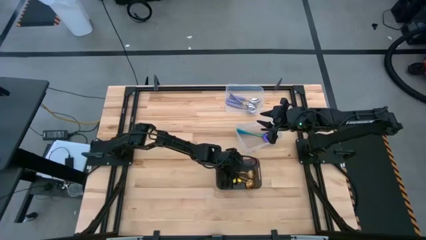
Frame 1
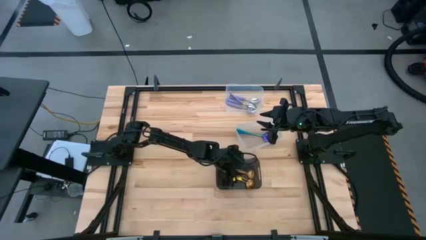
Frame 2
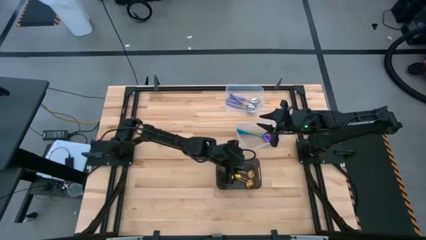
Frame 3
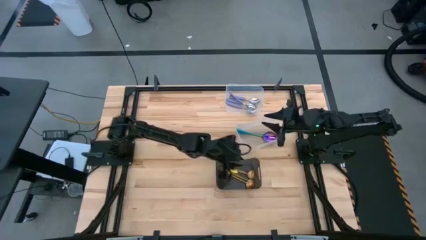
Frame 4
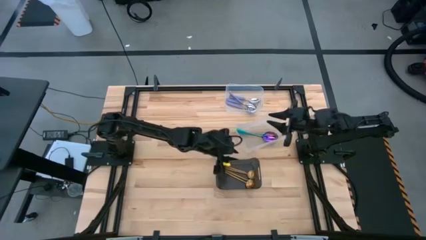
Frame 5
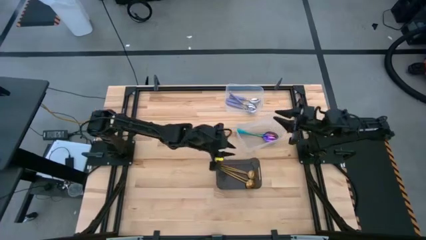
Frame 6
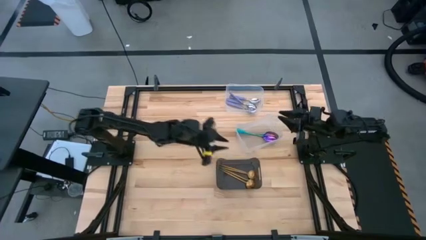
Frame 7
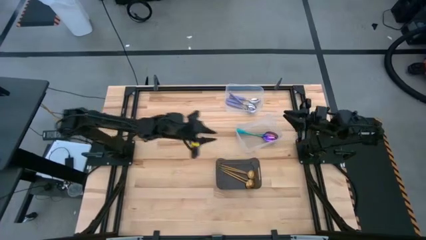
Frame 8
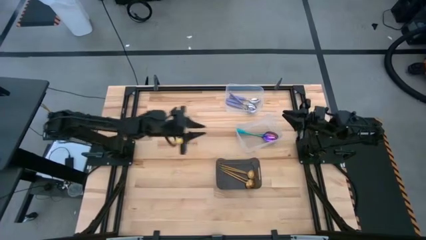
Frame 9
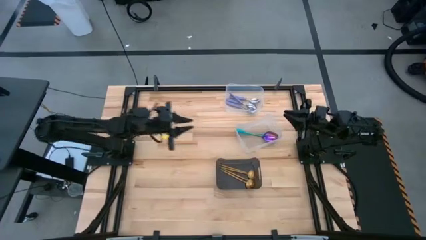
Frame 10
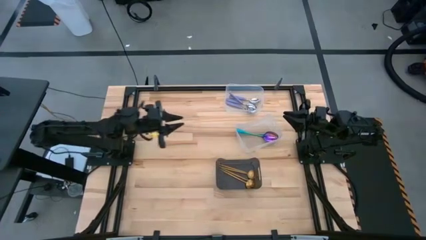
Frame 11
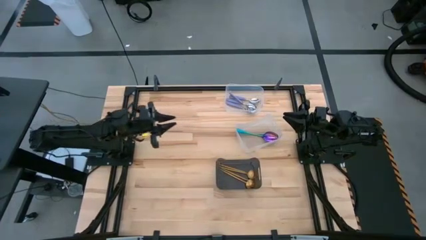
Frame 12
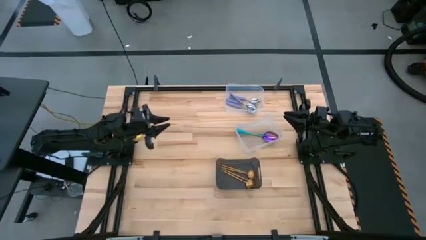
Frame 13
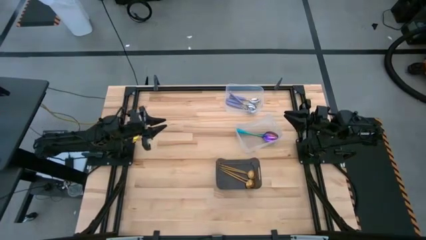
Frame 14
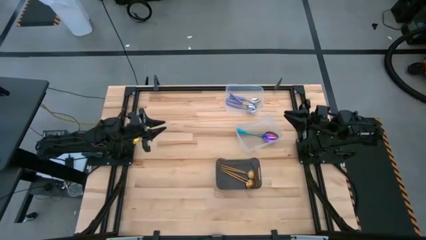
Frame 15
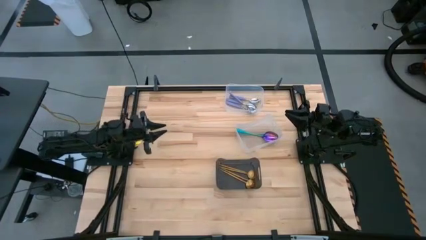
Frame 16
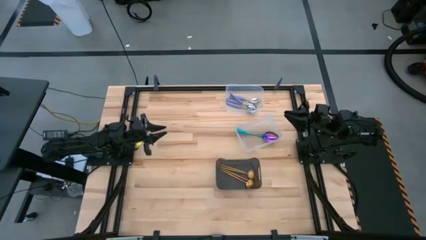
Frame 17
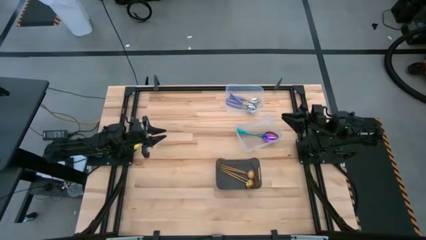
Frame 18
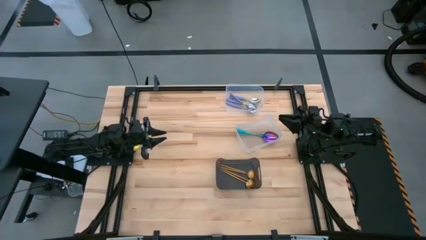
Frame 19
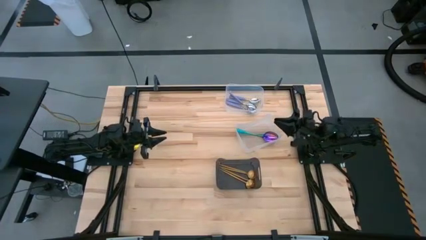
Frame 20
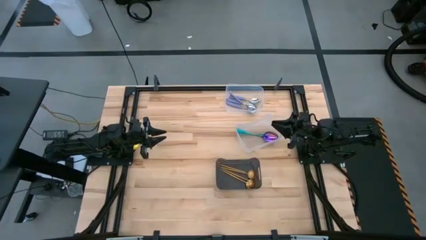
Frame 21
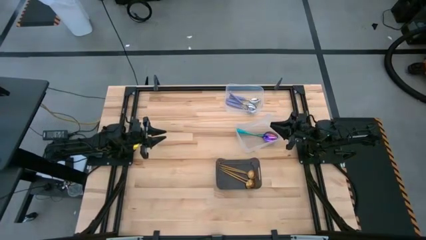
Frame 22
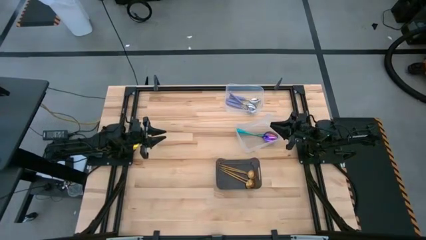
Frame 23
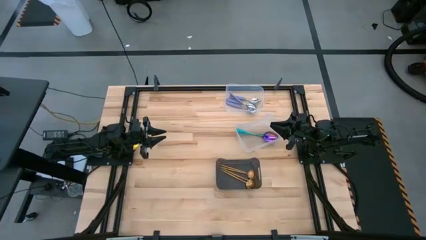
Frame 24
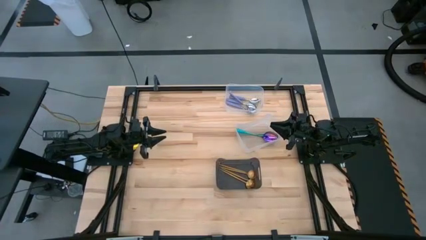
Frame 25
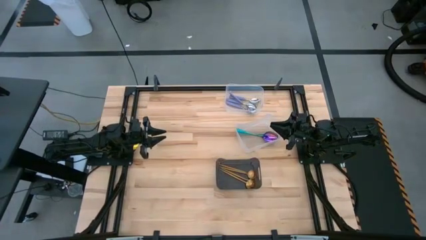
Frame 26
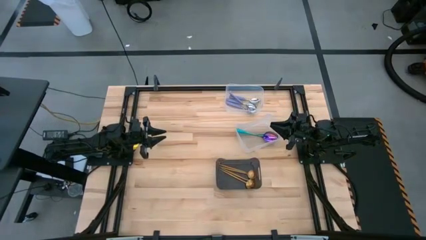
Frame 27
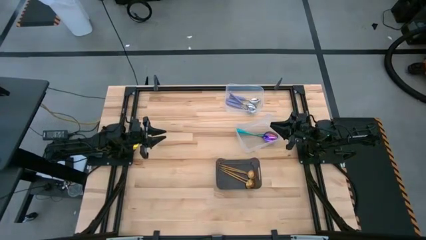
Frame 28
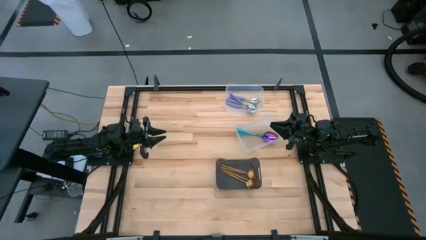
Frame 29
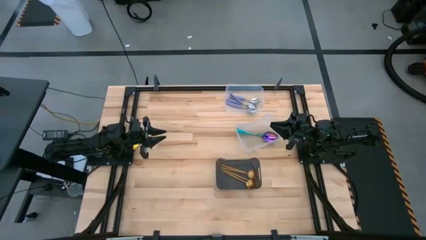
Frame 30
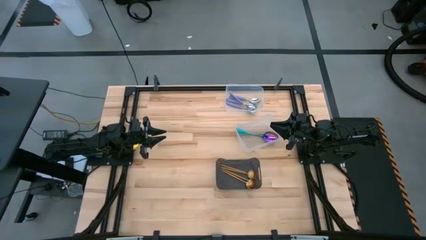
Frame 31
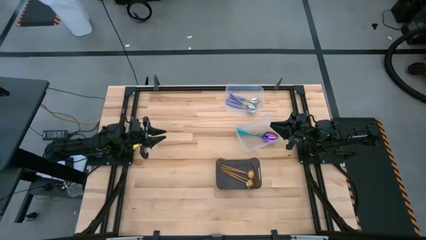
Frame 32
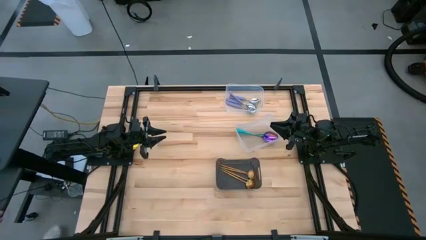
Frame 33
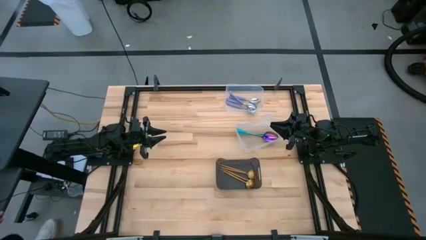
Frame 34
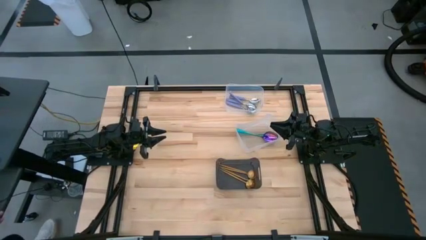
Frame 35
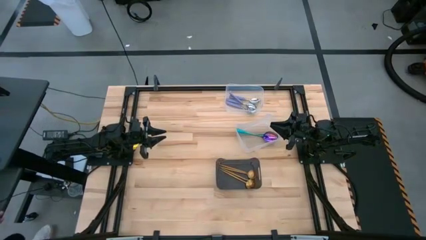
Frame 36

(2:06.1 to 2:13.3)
Task: Sort silverware by color (type)
Return to Home Position

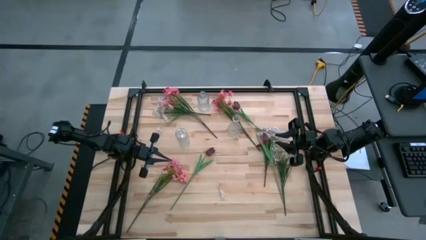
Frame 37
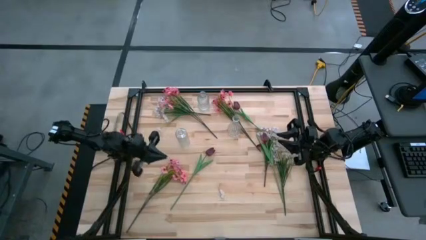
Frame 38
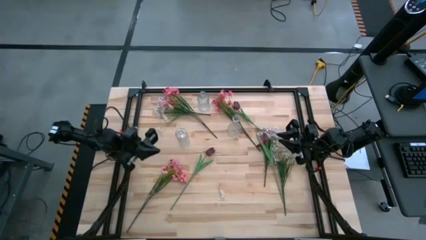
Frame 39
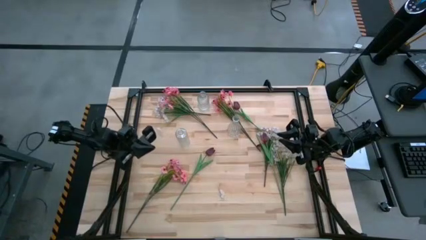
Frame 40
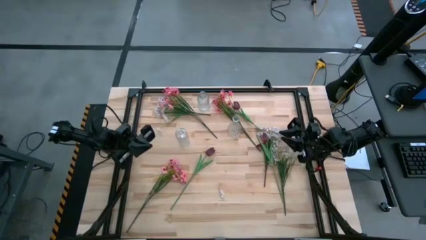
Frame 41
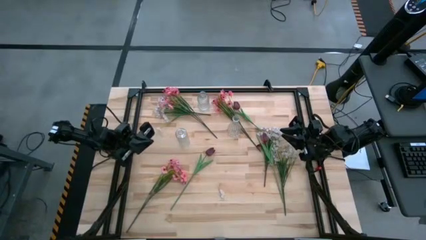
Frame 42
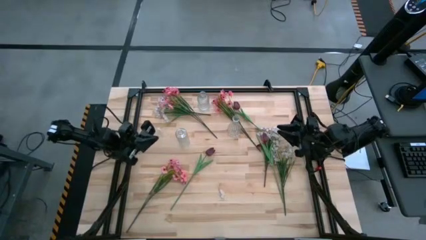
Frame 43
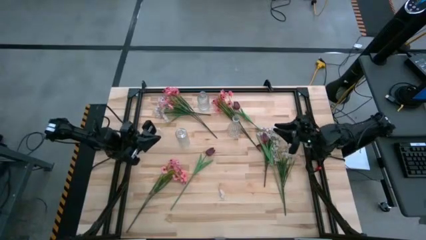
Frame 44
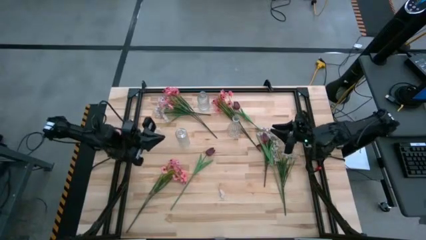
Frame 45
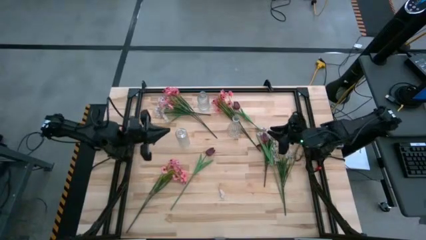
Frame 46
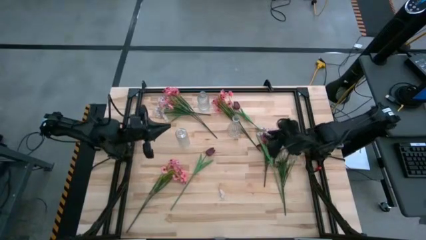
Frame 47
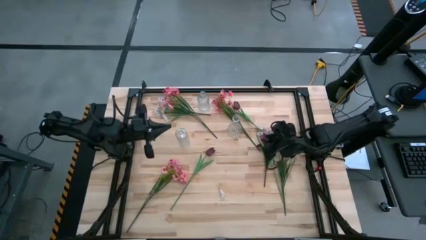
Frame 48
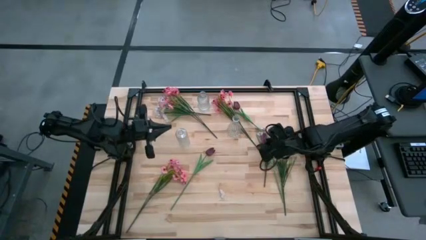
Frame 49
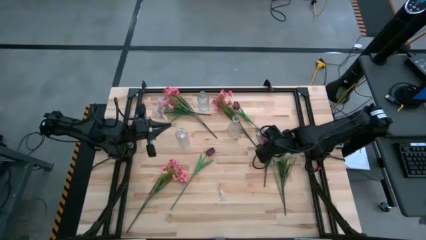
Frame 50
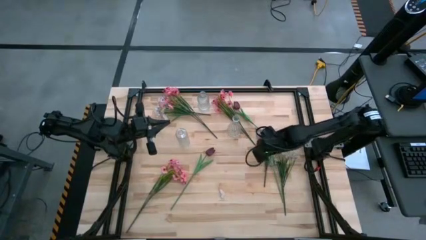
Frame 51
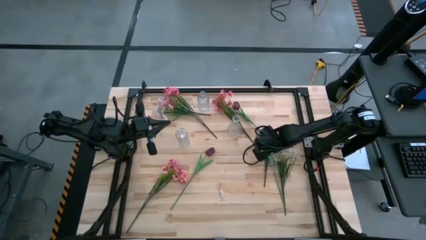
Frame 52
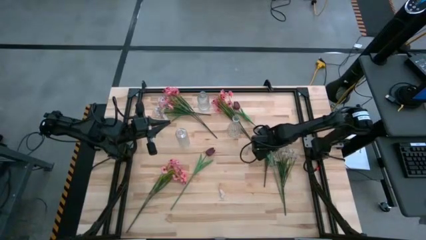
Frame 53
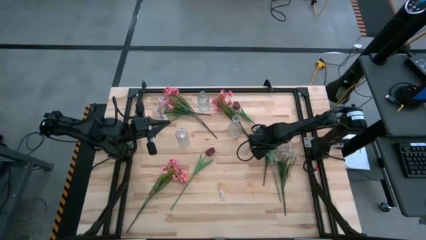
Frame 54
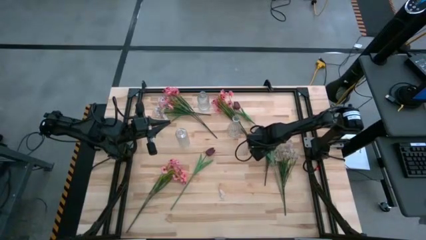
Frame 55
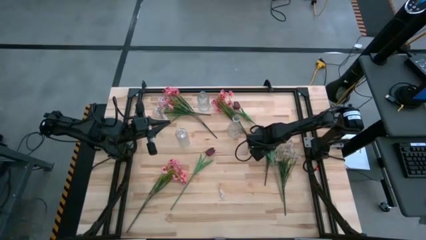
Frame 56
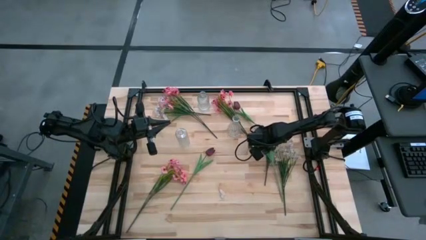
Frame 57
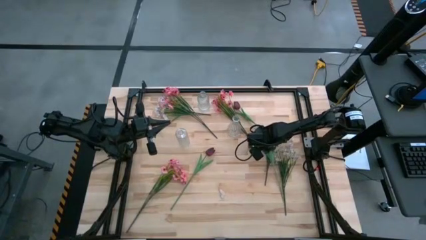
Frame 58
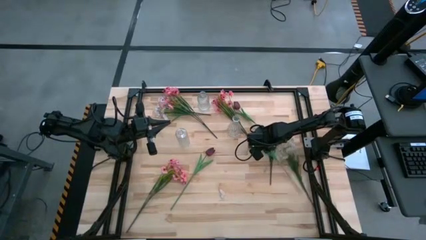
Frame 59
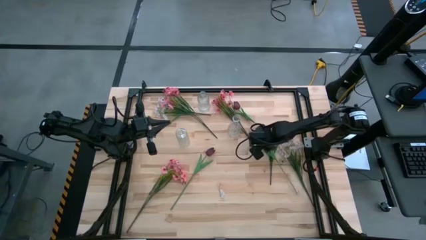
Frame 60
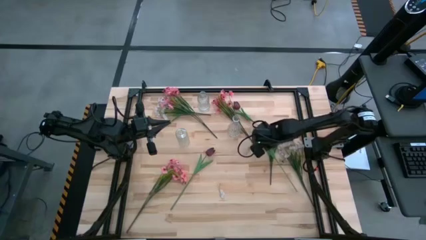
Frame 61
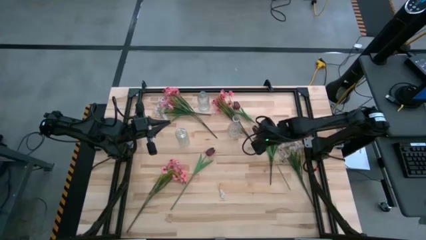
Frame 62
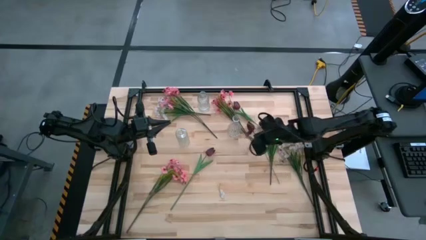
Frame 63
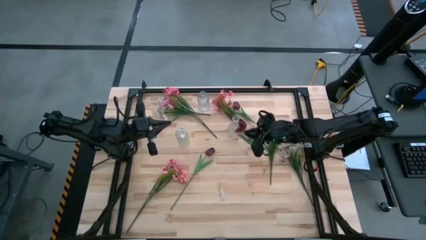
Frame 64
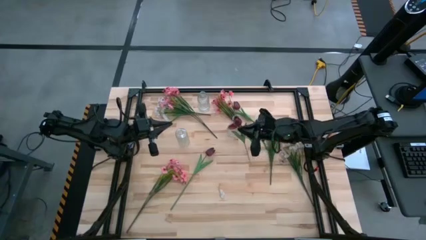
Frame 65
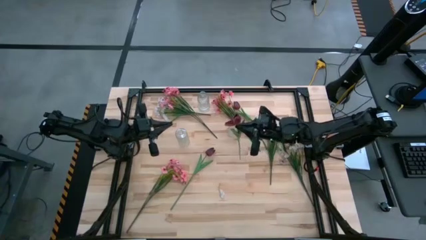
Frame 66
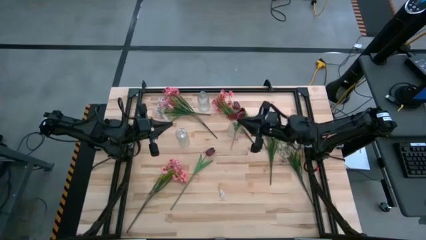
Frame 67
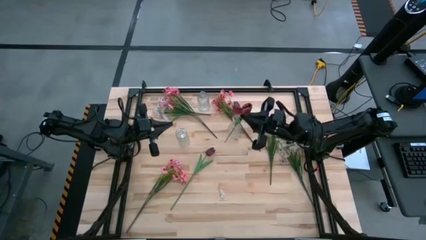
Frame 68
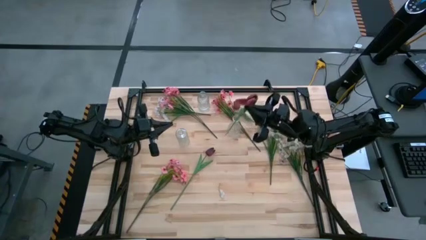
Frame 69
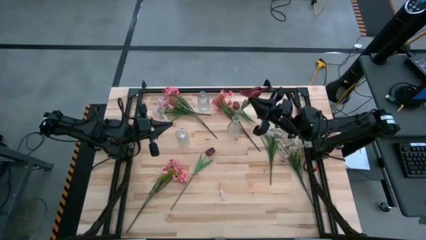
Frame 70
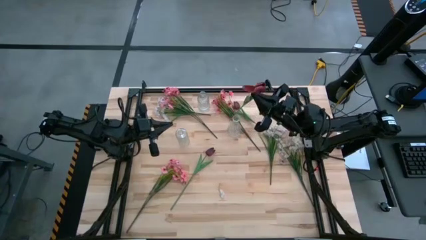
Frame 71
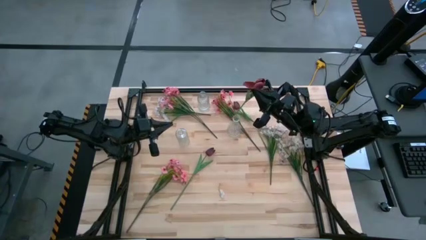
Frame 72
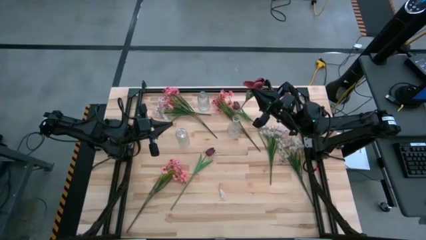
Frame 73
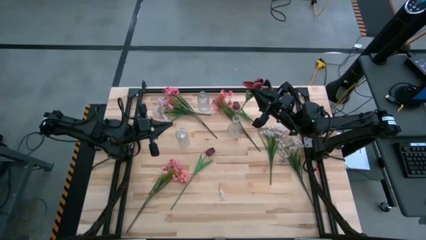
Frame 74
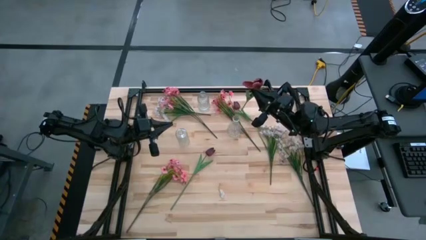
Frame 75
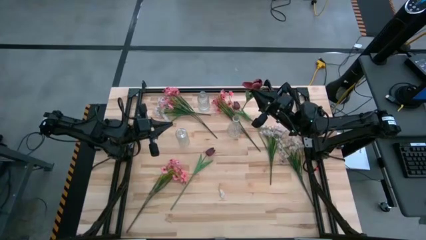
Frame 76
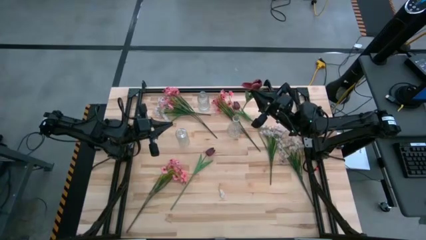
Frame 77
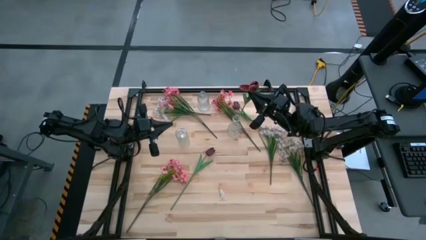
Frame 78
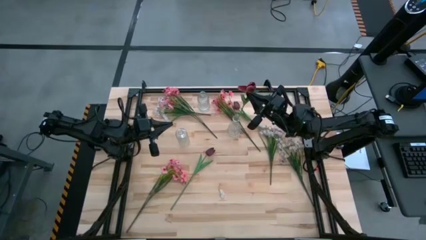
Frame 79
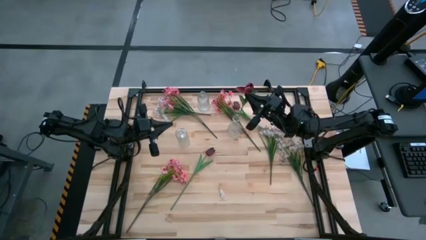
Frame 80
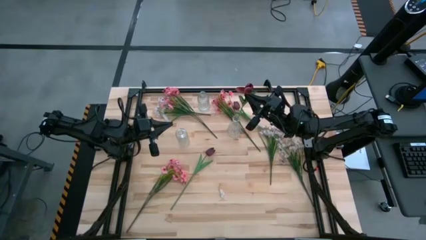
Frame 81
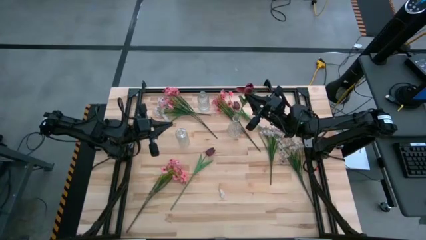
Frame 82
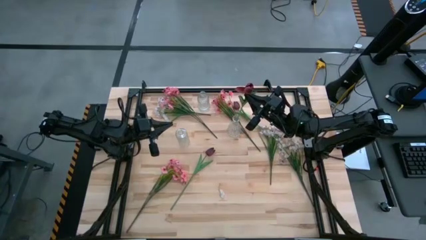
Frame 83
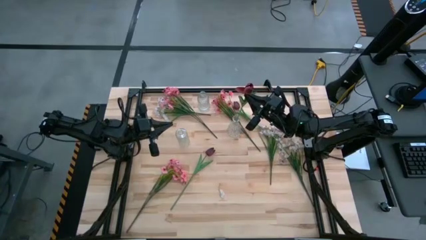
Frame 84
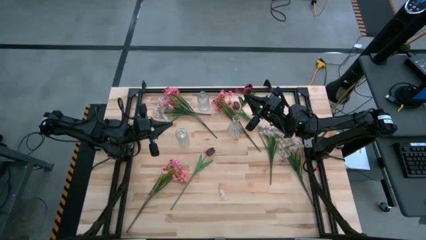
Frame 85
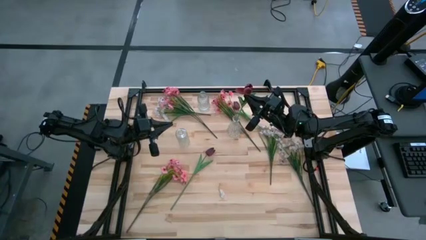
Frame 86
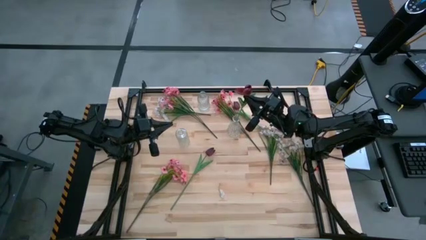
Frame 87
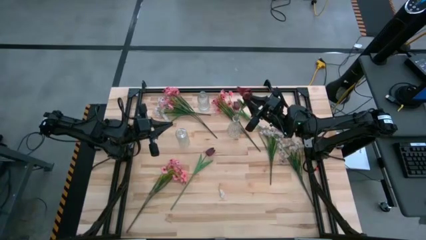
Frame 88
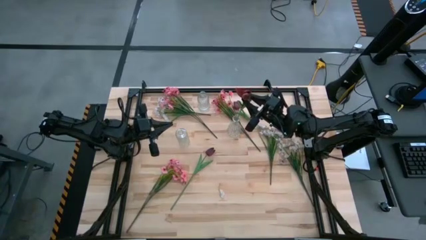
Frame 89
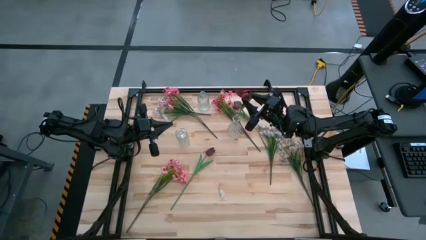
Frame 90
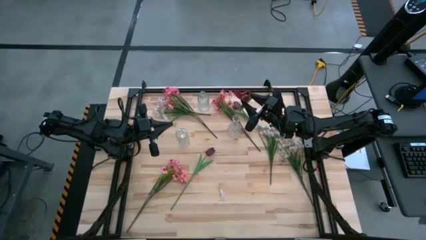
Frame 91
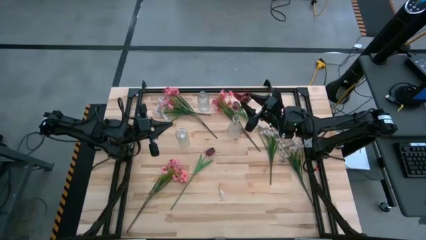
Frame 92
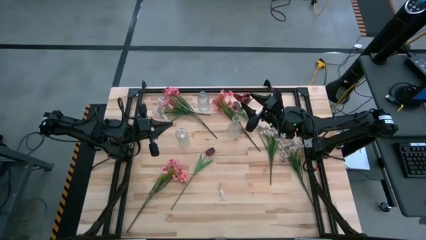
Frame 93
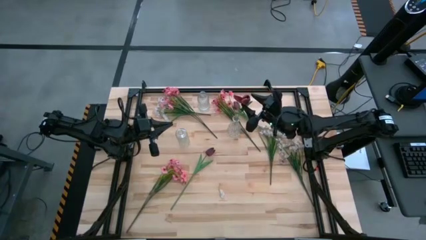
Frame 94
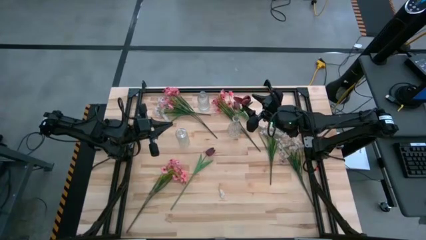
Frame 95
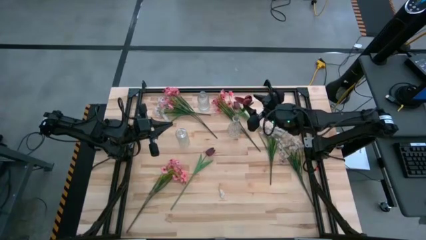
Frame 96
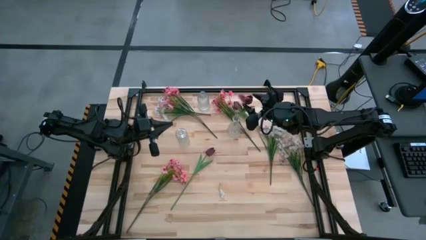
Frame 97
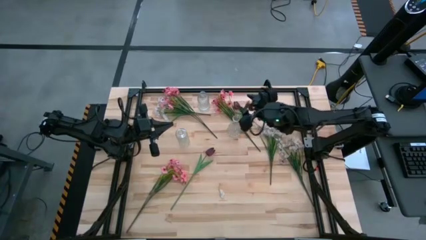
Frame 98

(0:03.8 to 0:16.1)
Task: Sort flowers into vase by color
Put the bottom right red tulip into the bottom right transparent vase
